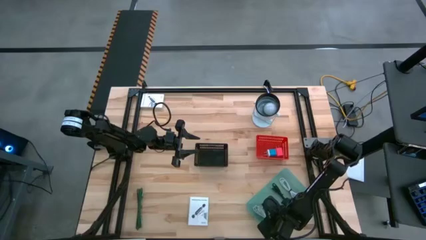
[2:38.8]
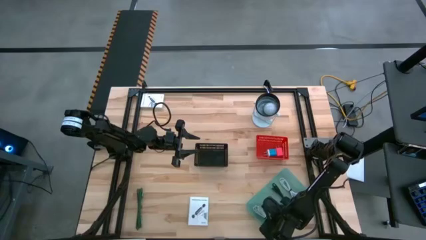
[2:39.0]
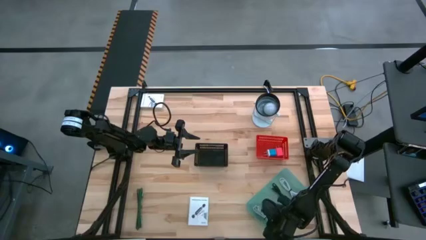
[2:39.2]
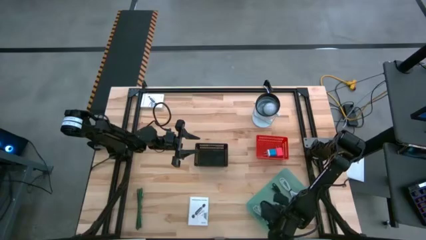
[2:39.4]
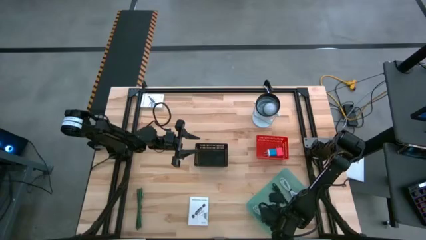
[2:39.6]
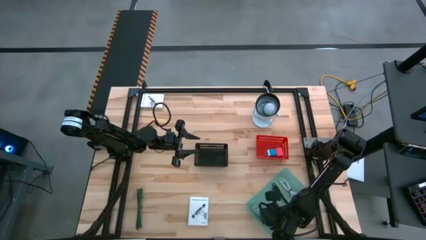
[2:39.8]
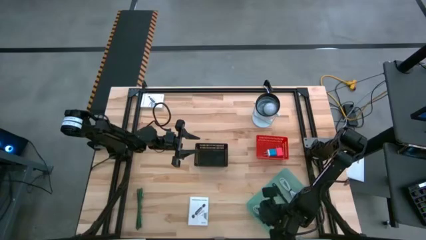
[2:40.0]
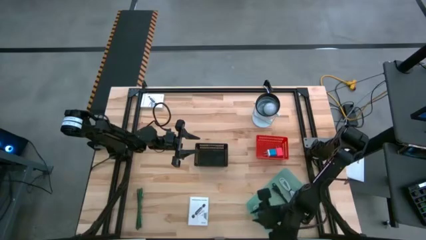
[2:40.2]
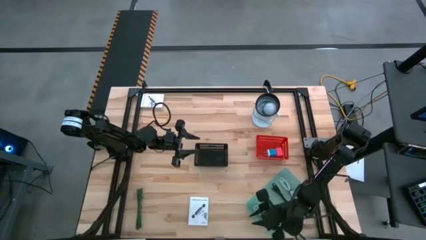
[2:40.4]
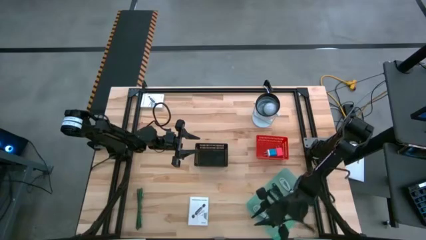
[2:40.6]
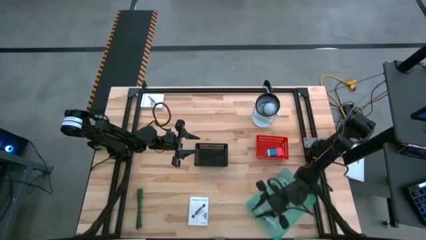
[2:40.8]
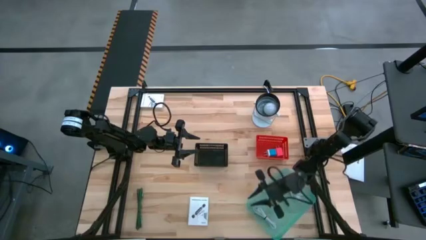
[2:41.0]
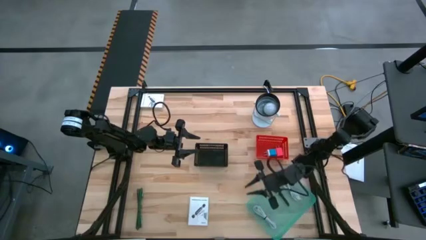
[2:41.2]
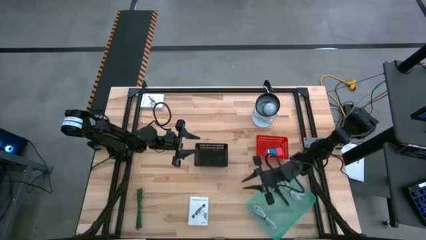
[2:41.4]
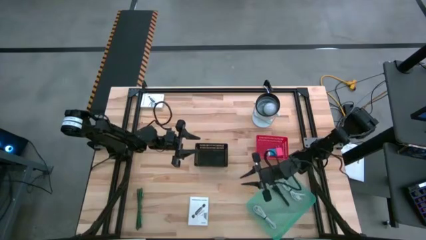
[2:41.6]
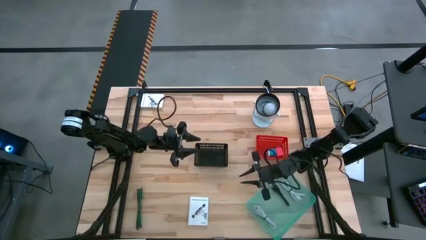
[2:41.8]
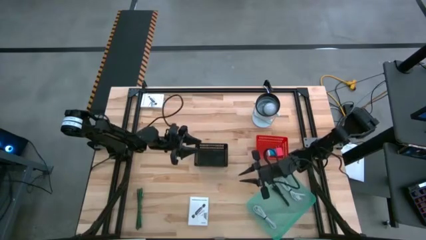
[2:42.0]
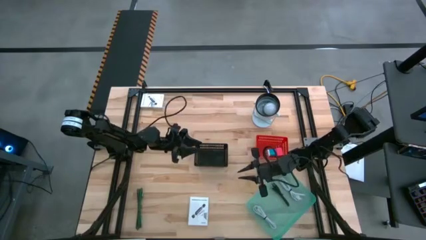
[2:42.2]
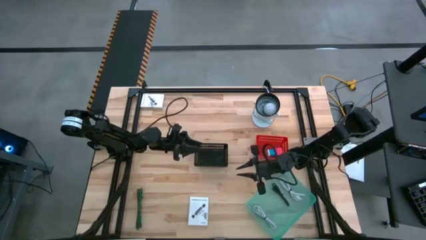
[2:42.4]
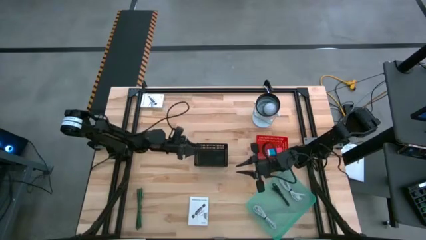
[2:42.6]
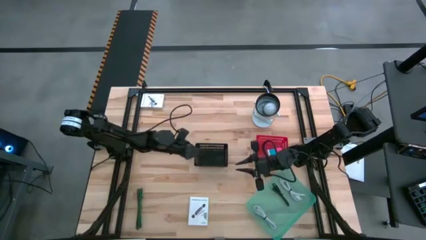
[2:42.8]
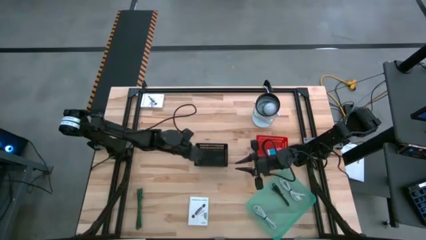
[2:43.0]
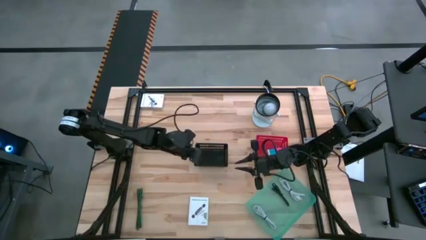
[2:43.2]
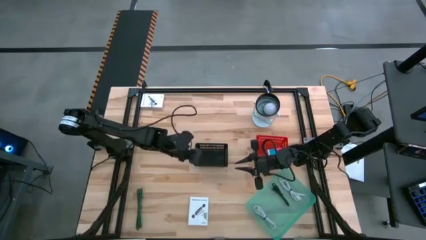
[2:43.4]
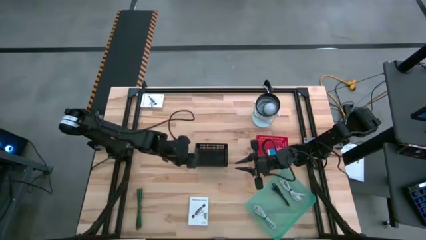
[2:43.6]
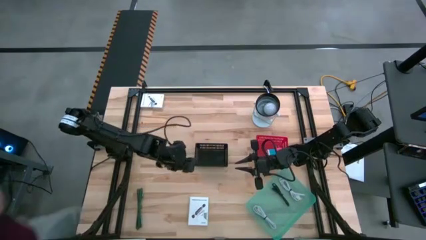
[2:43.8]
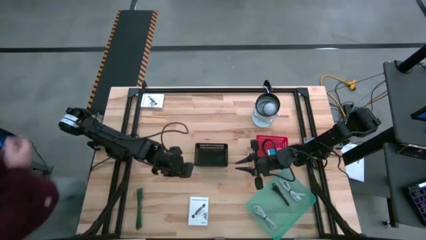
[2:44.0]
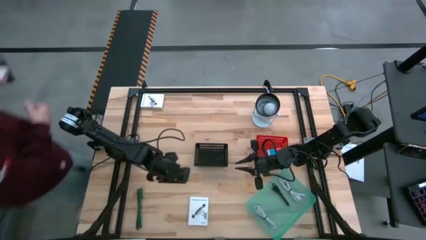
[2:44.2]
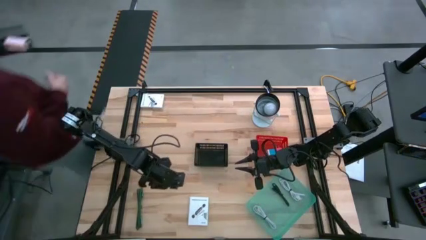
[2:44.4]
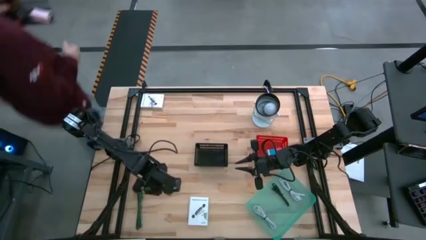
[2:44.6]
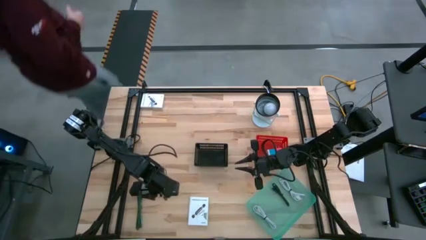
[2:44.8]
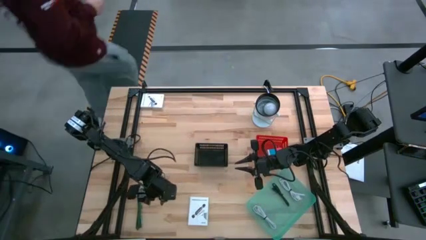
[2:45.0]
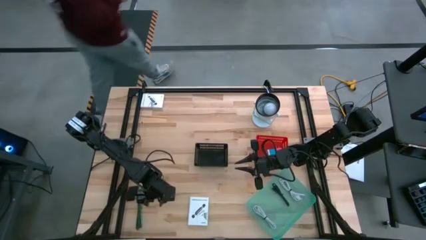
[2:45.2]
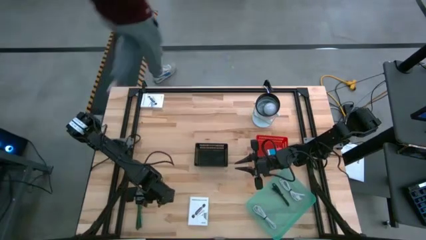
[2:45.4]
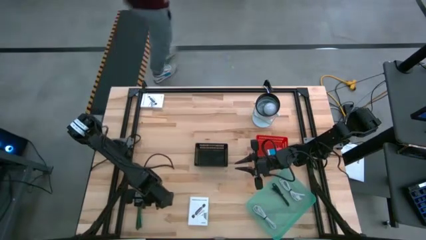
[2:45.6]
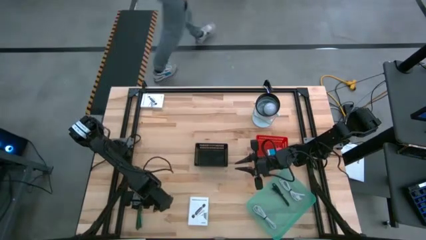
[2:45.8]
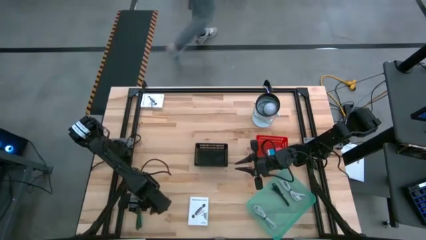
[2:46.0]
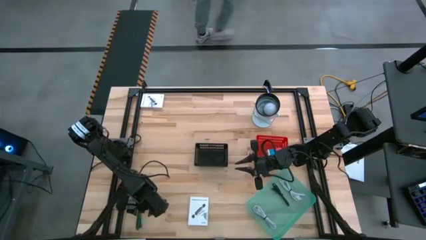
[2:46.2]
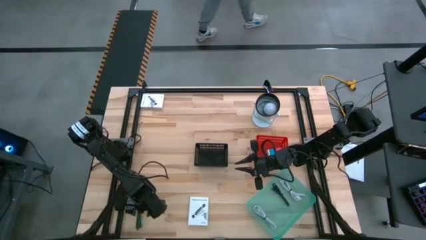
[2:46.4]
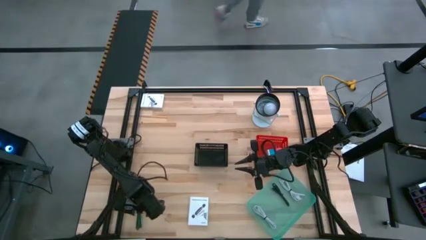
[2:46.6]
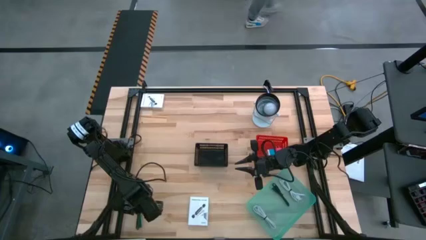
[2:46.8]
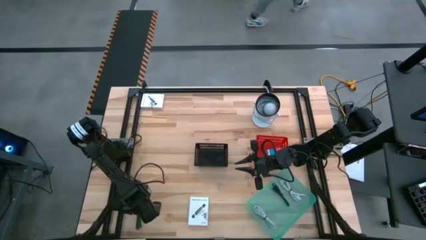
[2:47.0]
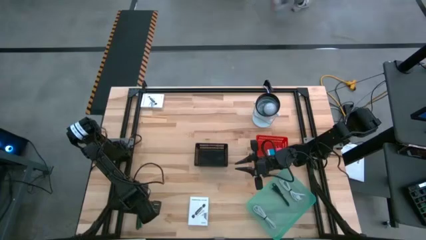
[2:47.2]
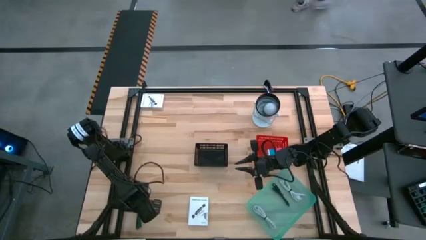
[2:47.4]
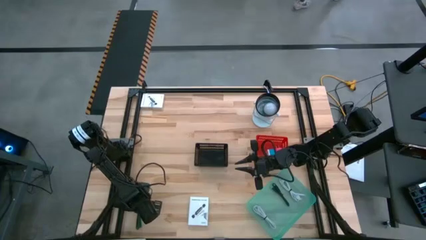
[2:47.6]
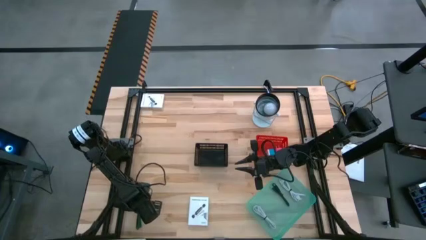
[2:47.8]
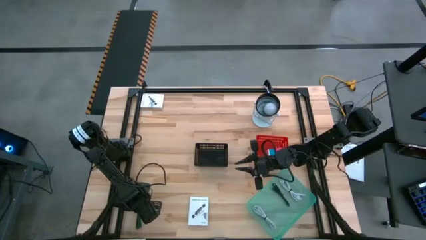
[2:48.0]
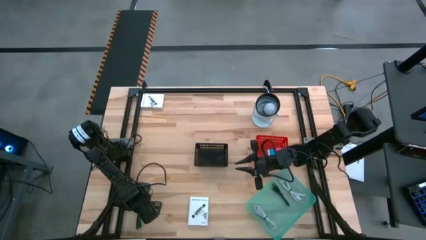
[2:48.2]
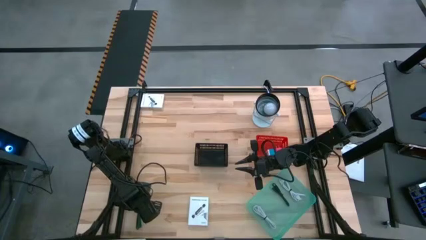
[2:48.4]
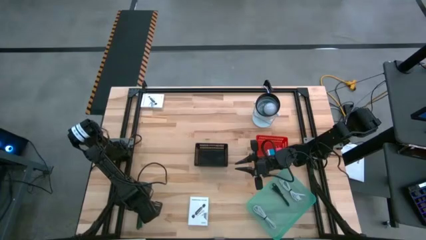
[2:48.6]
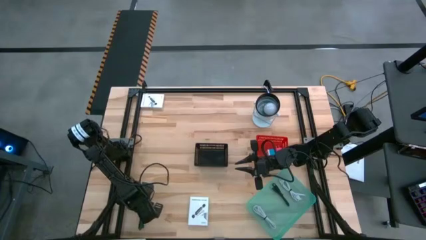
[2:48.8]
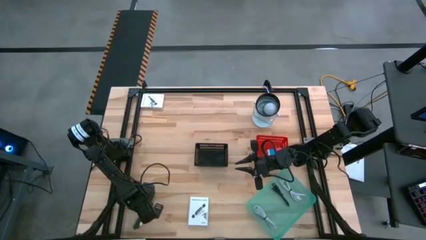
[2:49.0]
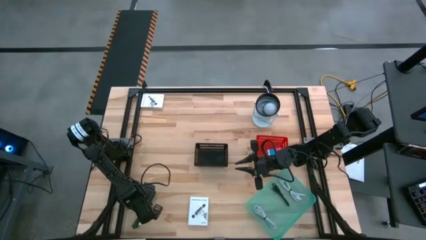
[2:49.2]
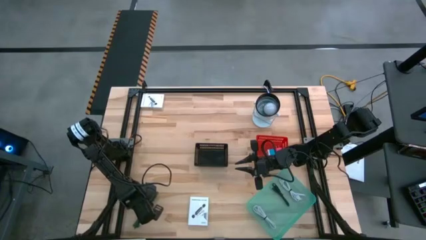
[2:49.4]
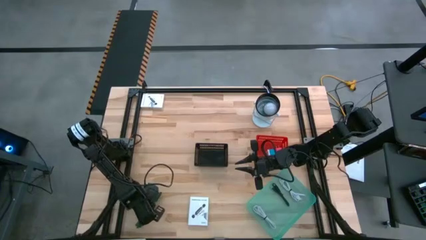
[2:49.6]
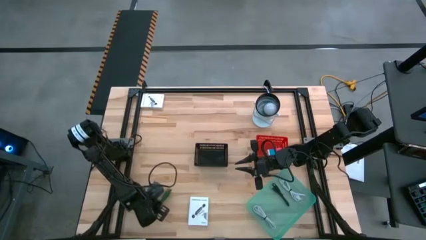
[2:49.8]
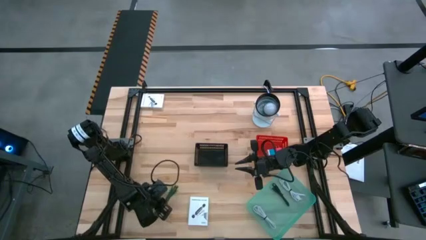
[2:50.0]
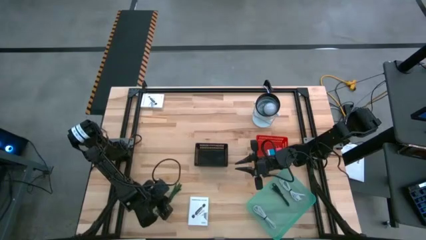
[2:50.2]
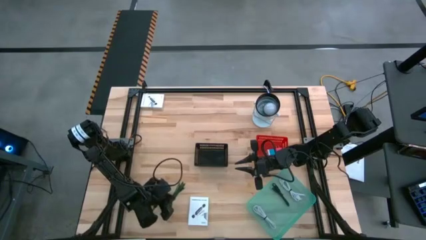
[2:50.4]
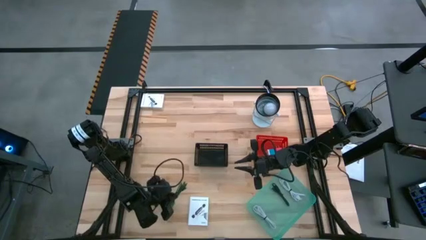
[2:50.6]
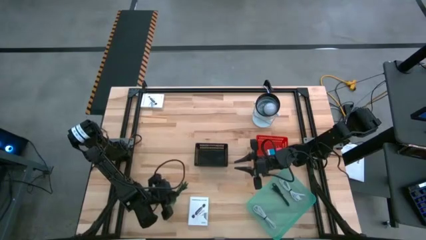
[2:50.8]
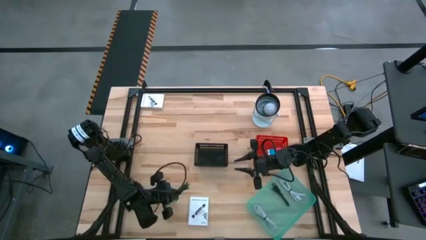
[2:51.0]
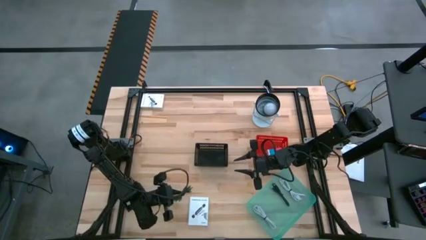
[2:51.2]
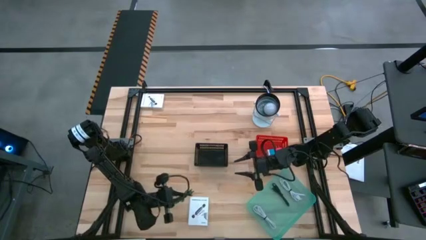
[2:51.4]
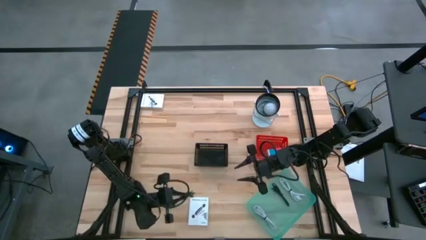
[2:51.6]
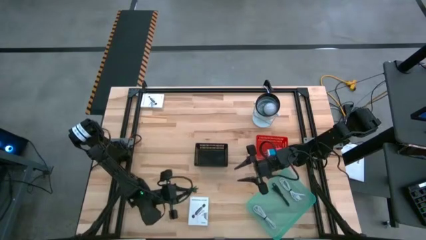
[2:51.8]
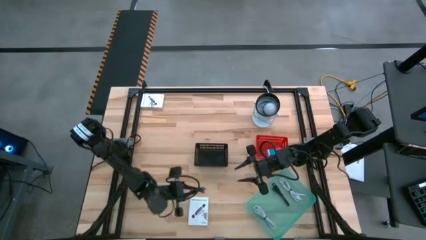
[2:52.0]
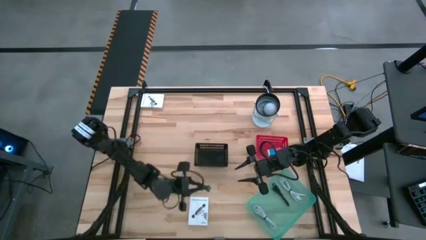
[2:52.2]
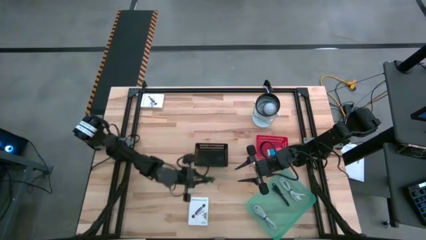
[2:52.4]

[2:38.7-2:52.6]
Task: Pick and place items into bin
Put the green charger cable into the blue bin

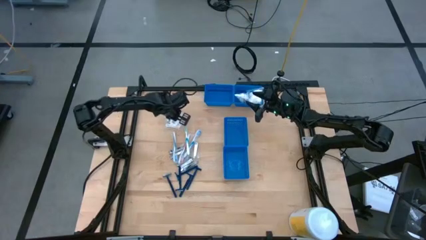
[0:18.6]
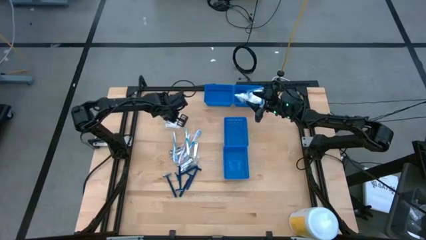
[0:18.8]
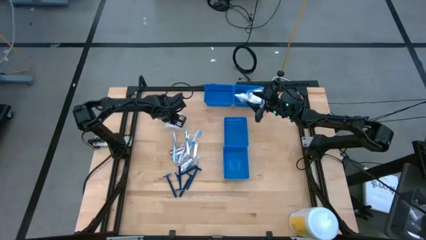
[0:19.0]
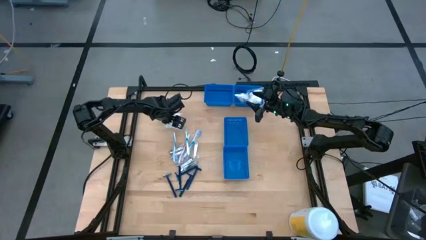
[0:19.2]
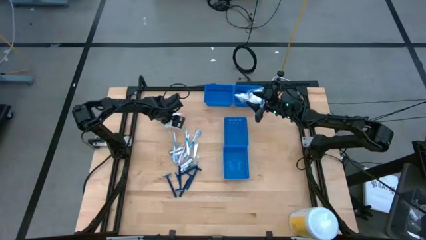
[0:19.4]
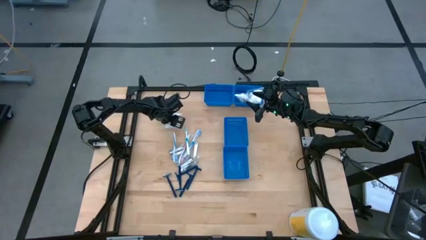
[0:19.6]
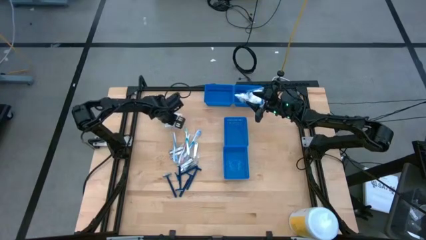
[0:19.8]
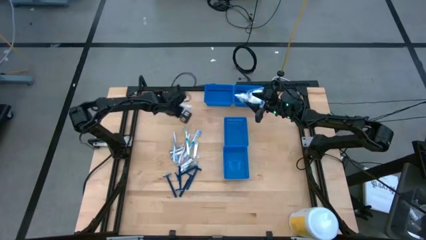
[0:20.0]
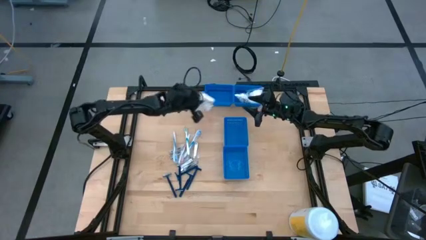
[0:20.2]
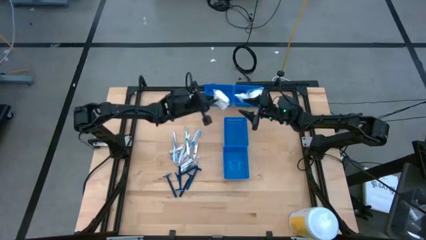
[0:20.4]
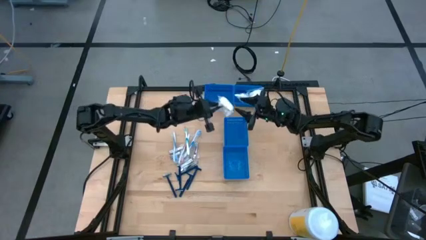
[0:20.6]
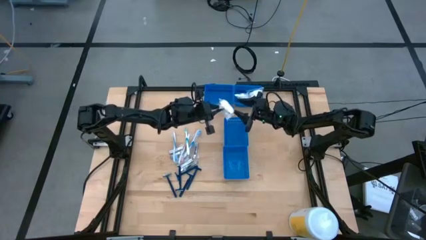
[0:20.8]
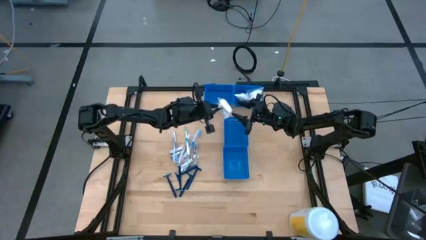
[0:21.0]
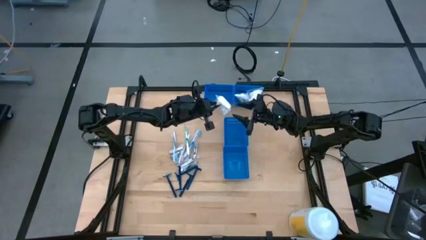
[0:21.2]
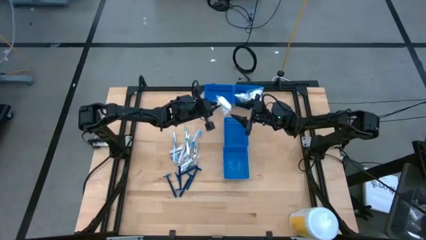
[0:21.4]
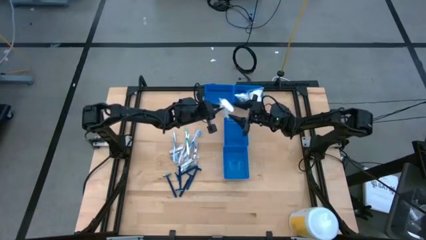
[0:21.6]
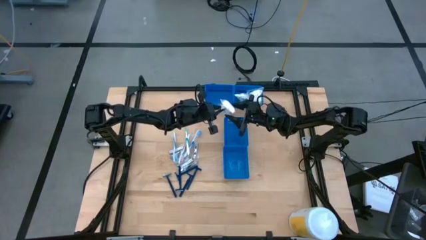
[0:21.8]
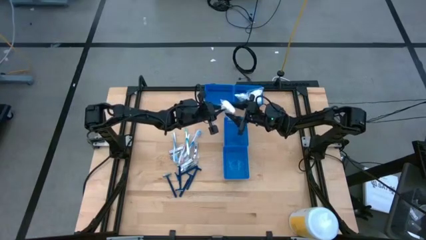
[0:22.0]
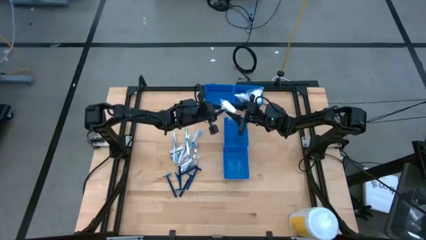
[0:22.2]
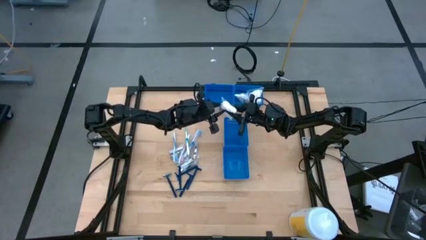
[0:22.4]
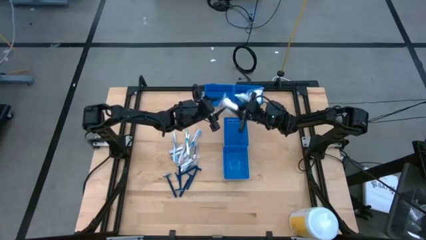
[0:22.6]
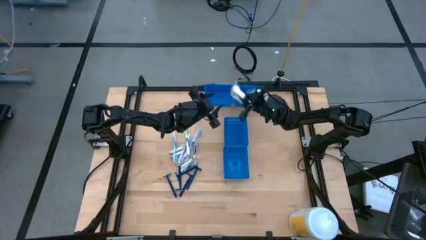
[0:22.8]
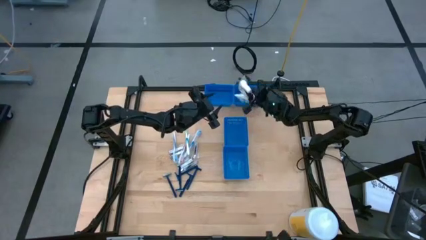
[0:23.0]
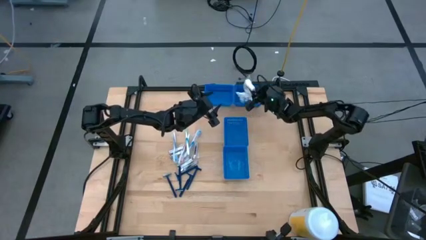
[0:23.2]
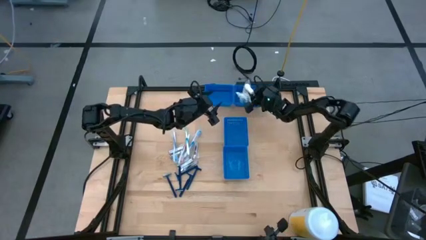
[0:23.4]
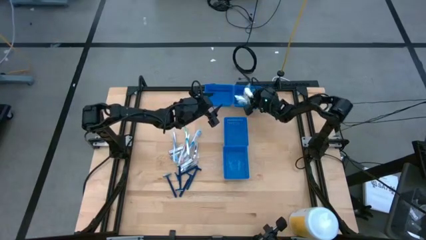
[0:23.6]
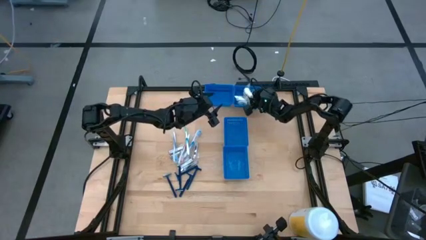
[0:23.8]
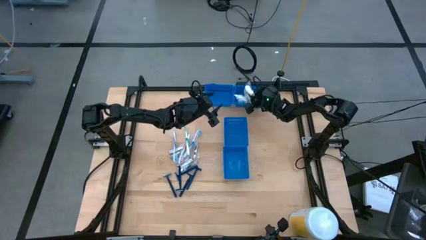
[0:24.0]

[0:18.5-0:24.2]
Task: Pick & Place Travel size toiletries
Put the cotton balls in the top right blue bin
